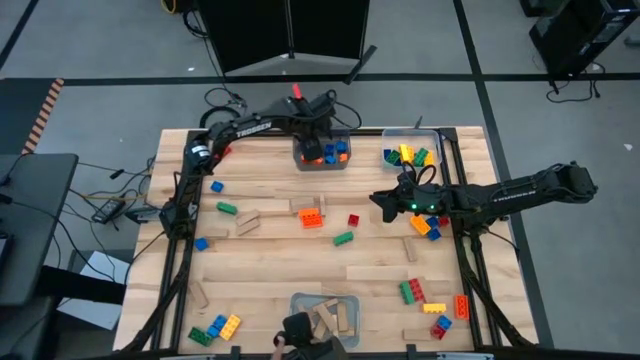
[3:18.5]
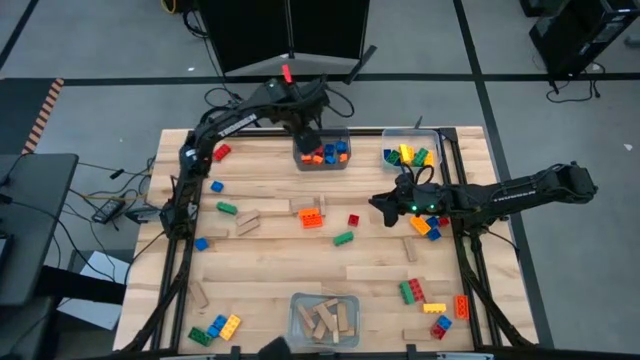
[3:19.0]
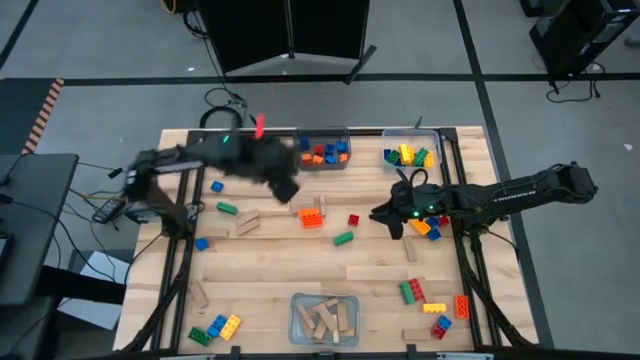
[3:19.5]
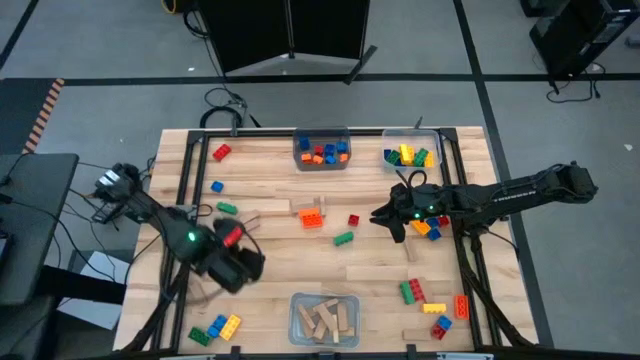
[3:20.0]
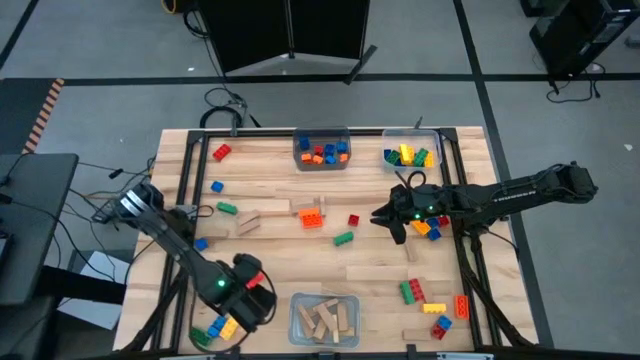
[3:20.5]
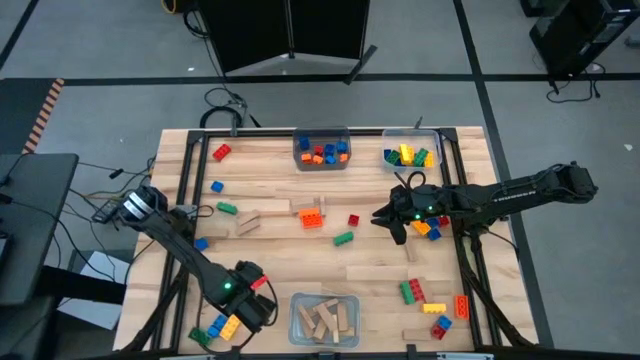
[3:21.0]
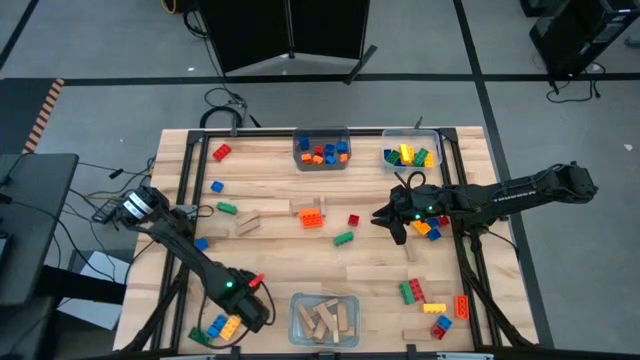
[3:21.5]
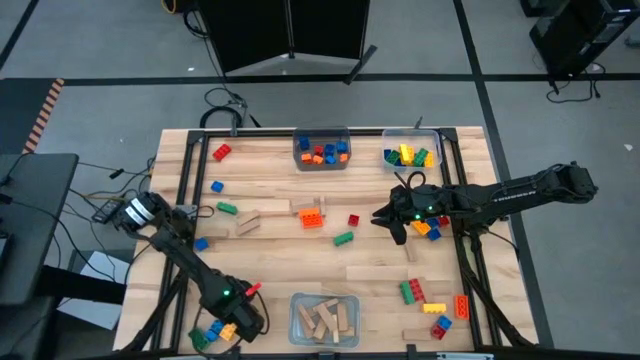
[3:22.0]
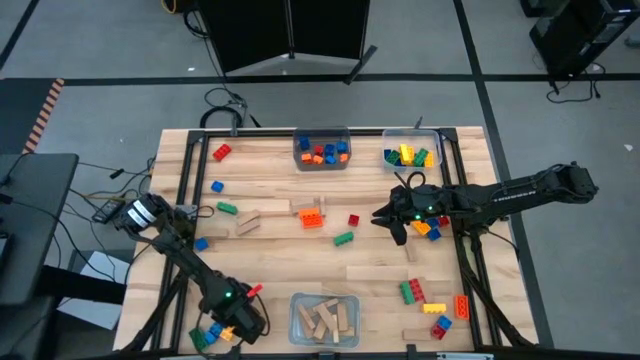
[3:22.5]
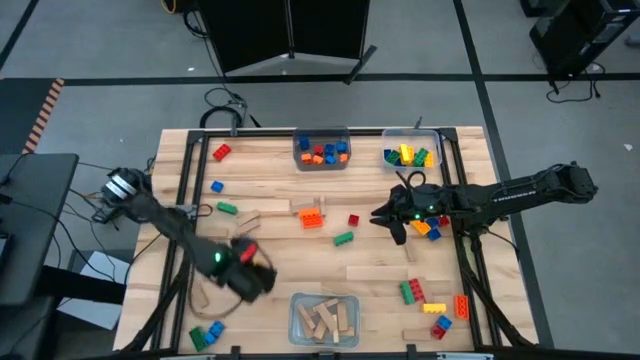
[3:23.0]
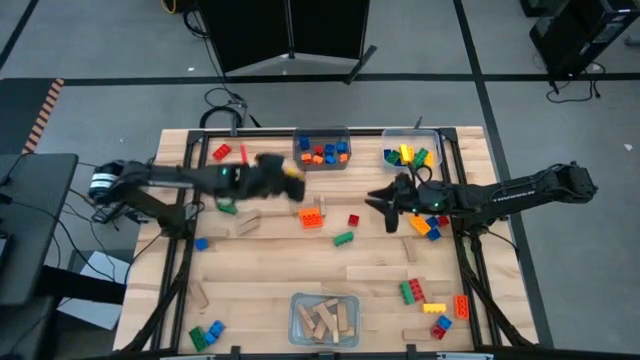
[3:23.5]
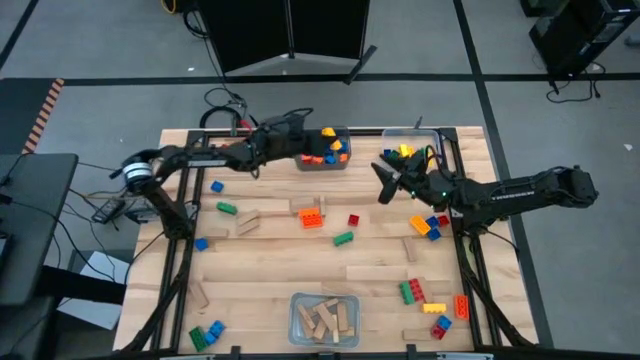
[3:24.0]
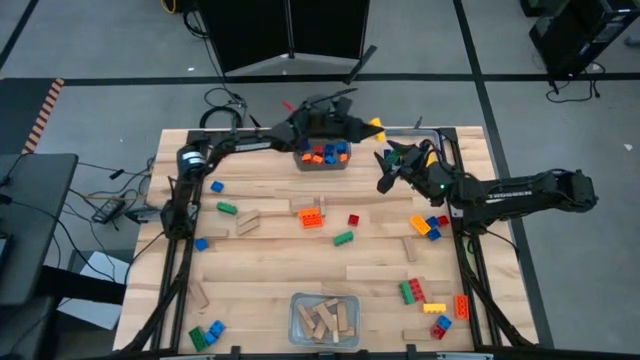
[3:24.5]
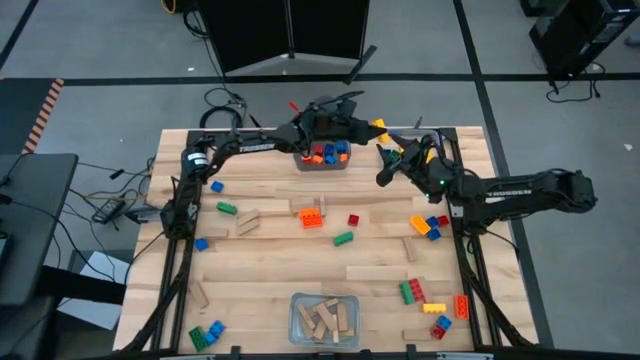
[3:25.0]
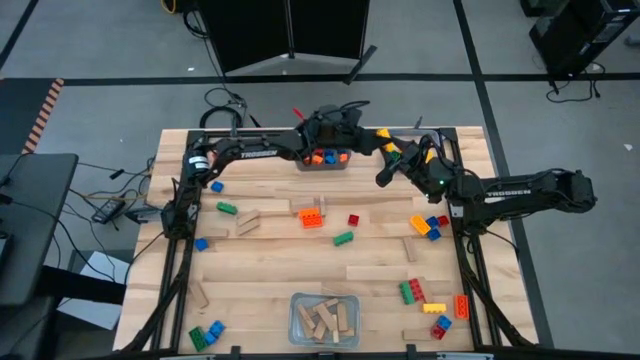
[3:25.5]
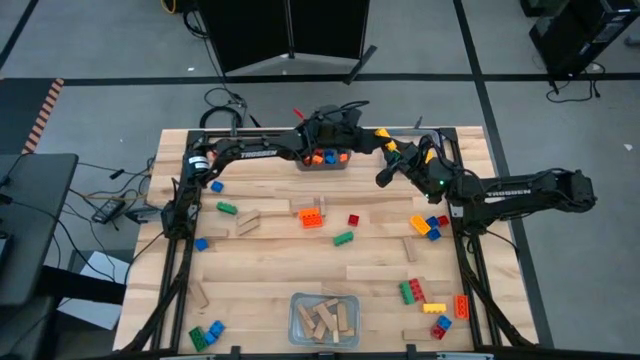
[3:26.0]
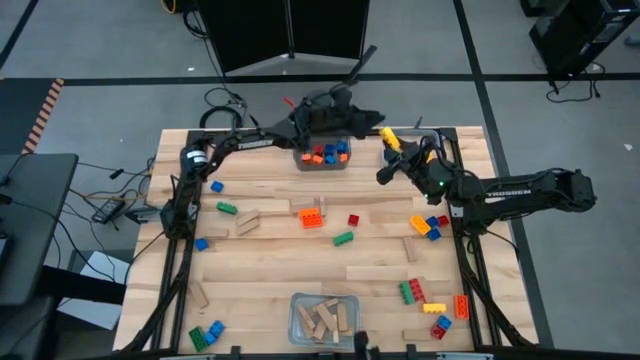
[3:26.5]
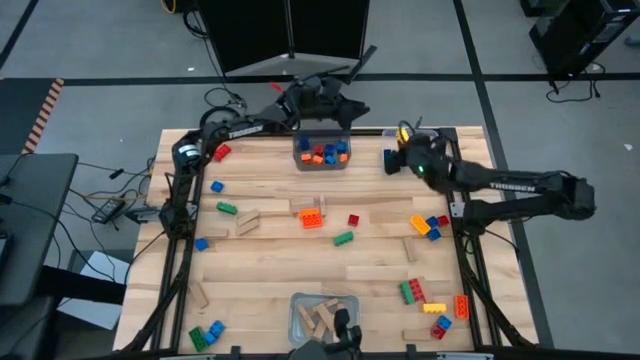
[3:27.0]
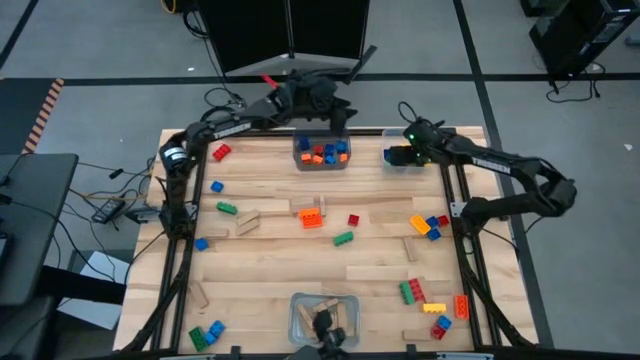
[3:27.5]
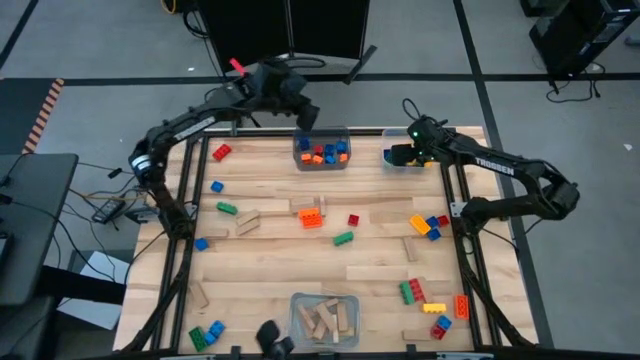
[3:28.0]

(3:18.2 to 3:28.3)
Task: Sort blocks by size
Put the large yellow game piece into the transparent bin

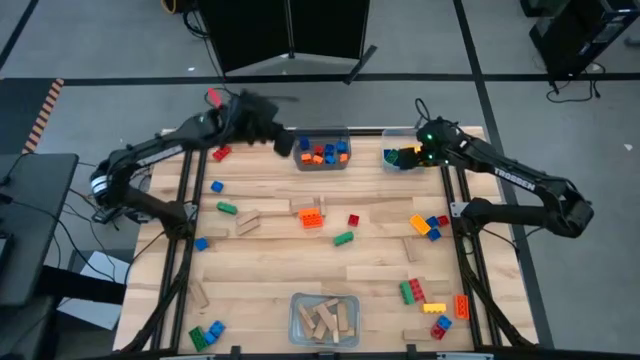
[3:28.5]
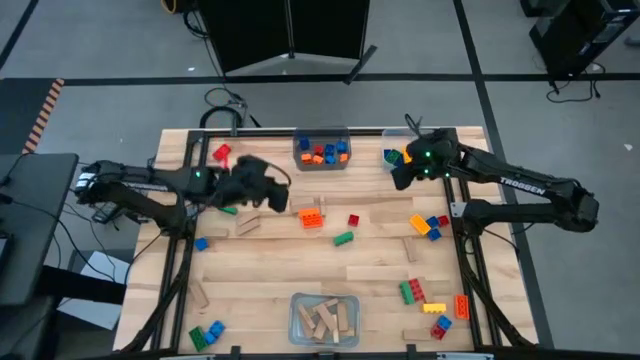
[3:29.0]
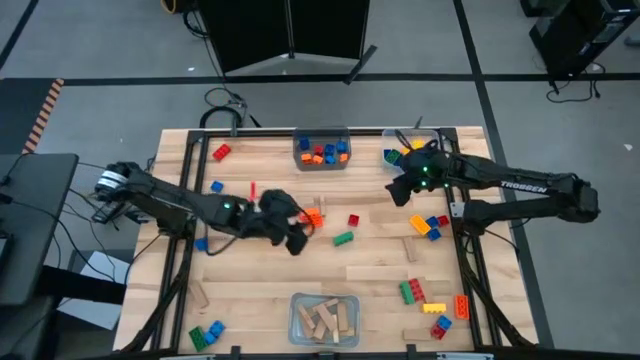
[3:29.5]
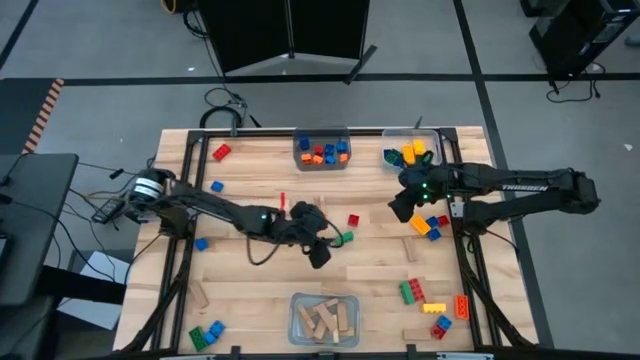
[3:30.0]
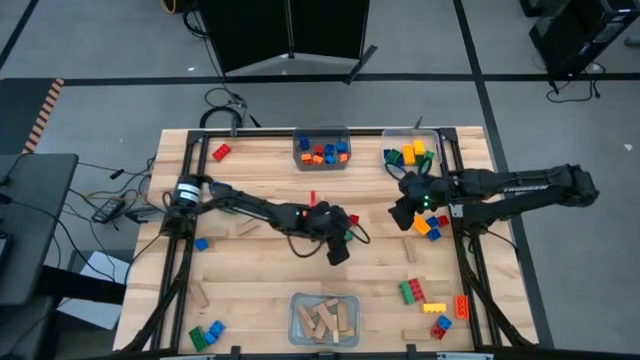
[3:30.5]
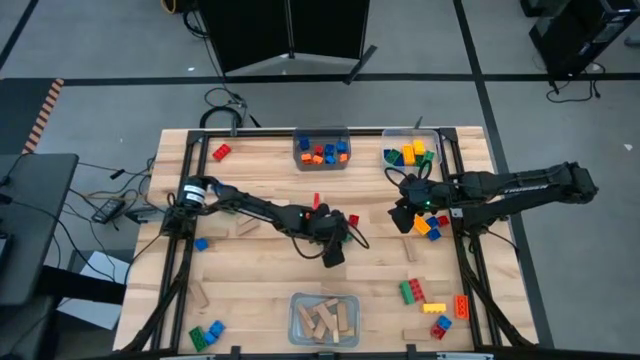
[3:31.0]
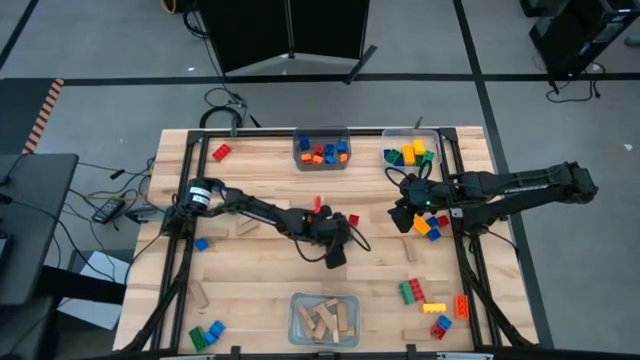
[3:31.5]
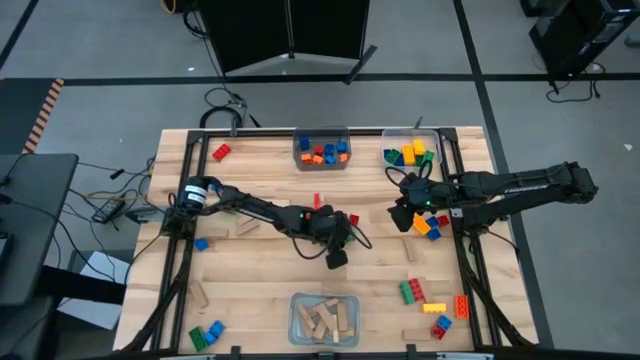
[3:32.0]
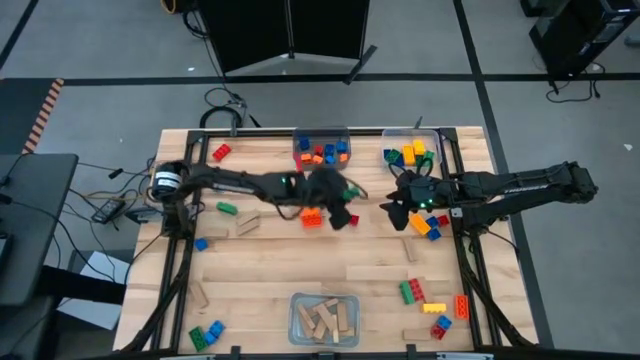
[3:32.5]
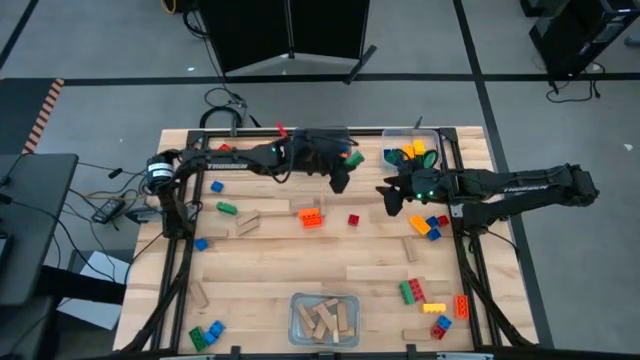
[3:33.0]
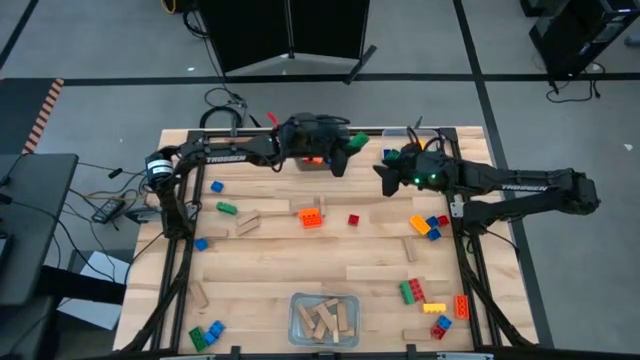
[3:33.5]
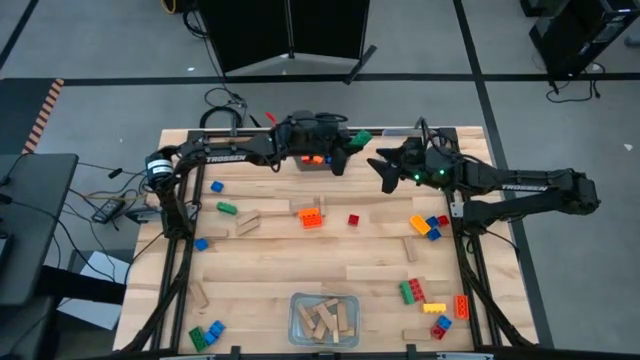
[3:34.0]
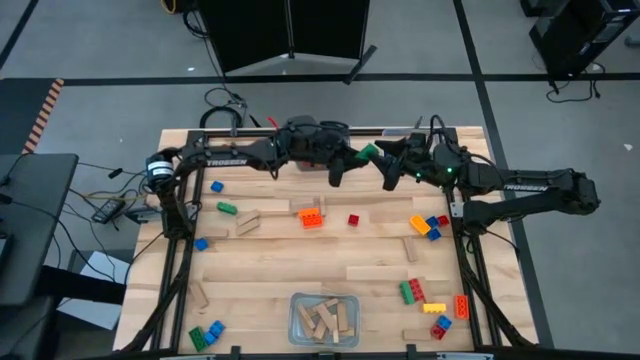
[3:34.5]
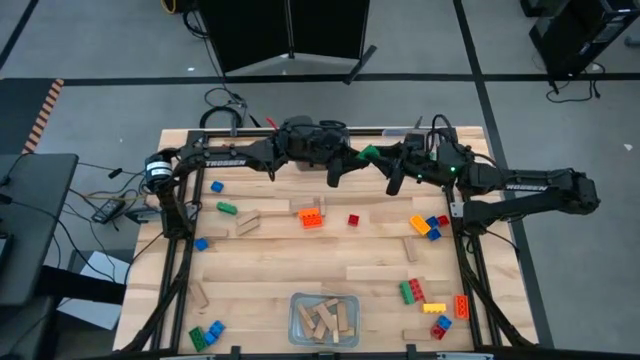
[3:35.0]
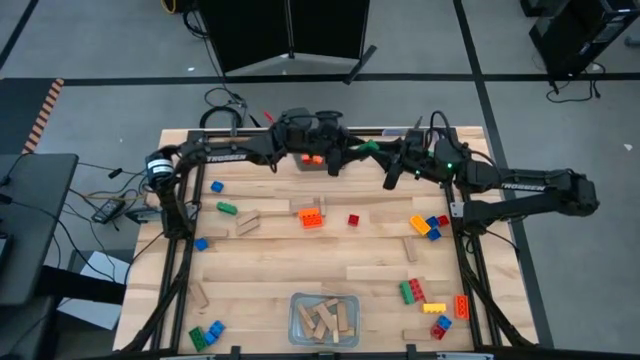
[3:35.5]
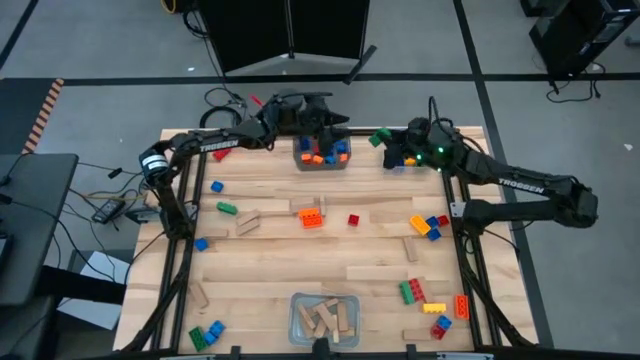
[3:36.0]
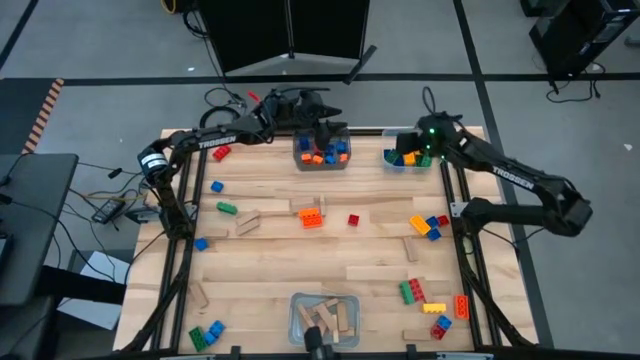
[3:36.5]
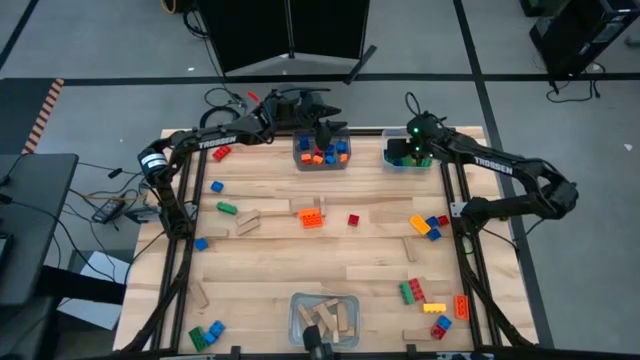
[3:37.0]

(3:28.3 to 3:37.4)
Put the large green game piece into the transparent bin

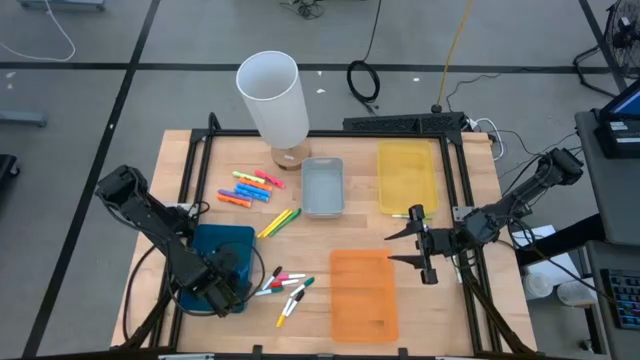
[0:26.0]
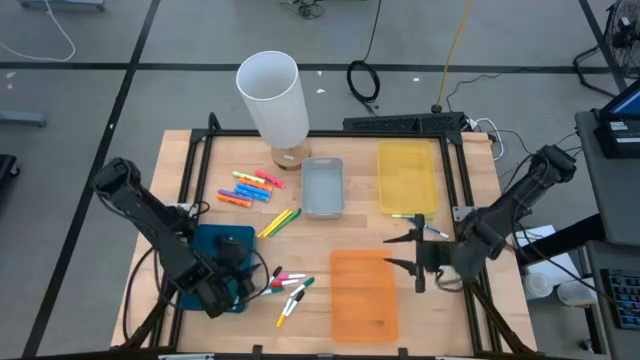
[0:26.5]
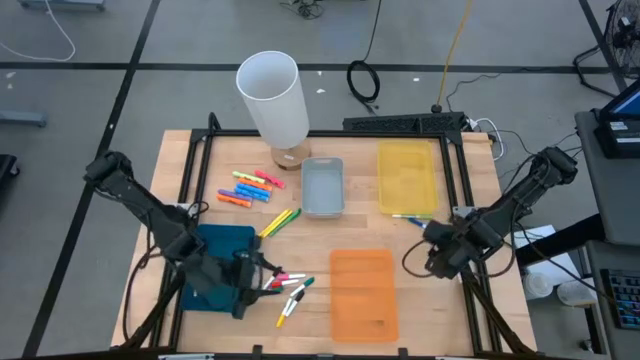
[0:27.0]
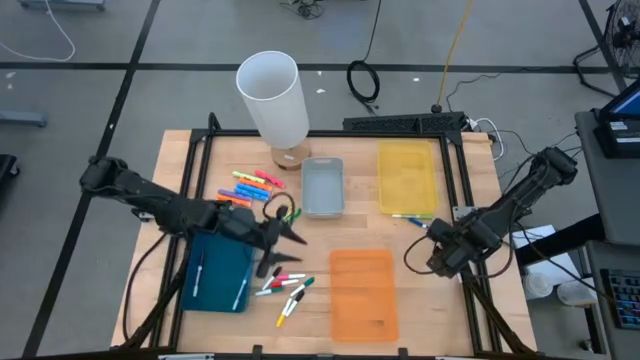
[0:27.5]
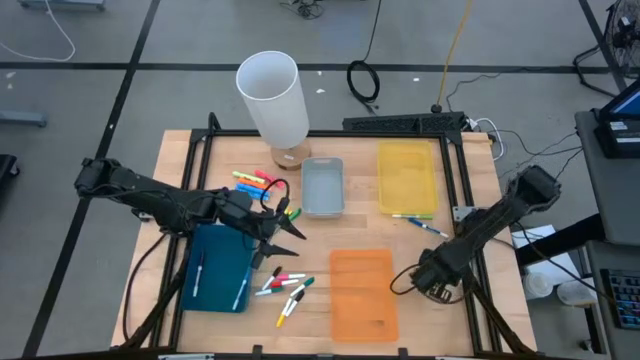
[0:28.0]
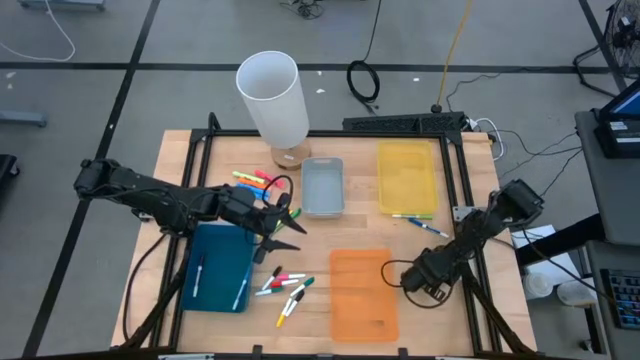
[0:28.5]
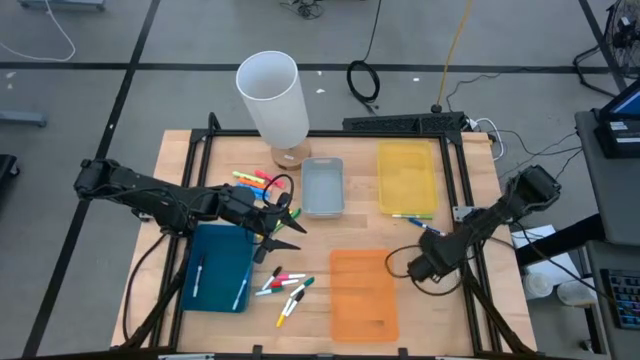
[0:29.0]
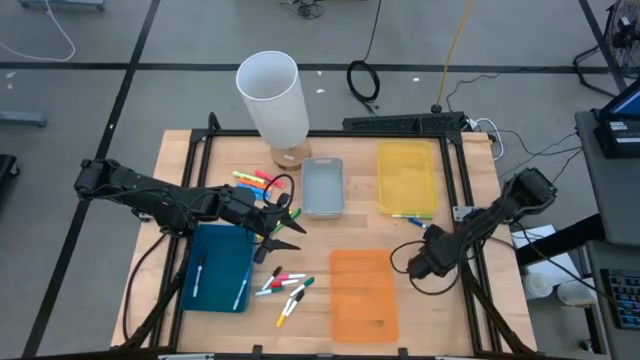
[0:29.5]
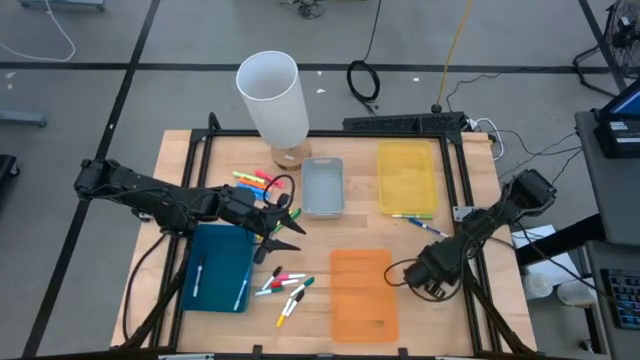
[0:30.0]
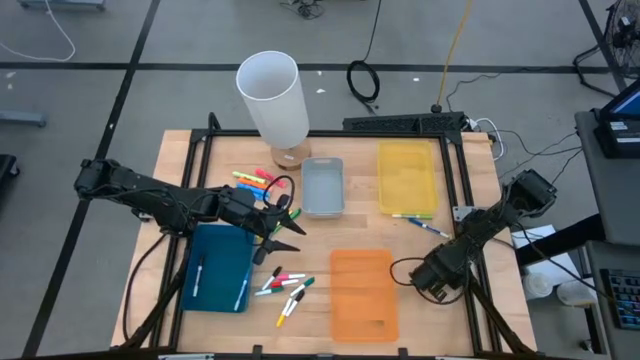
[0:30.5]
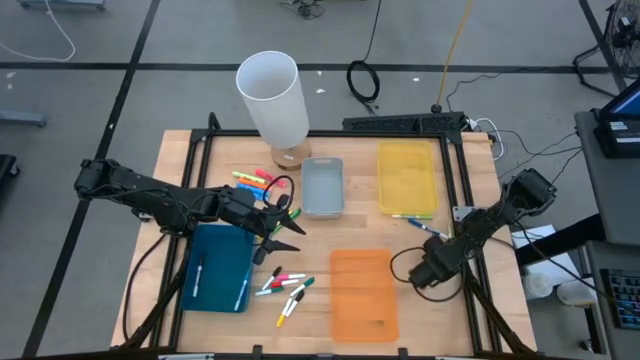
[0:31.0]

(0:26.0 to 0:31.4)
Task: Pick & Place Markers
Adjust the green marker pen
